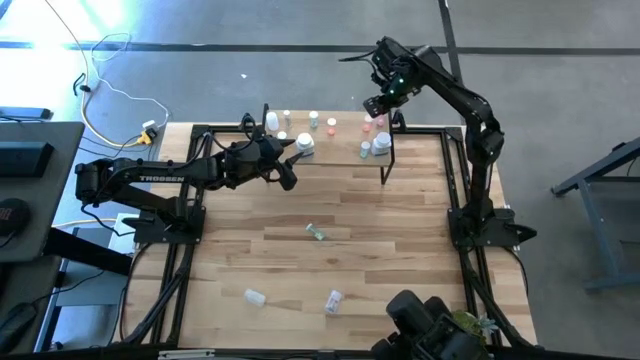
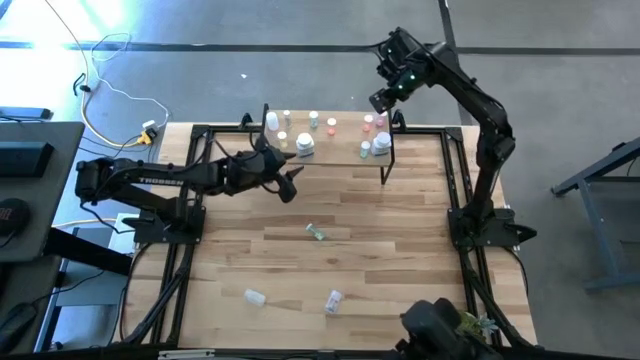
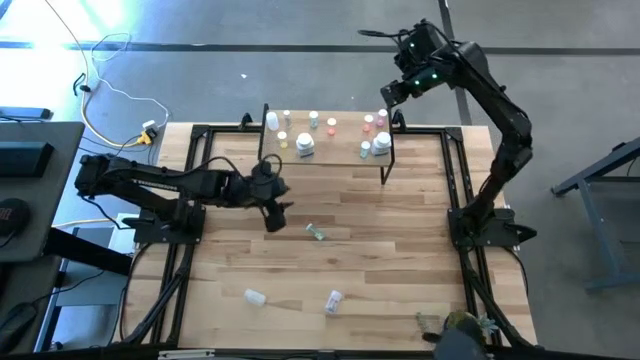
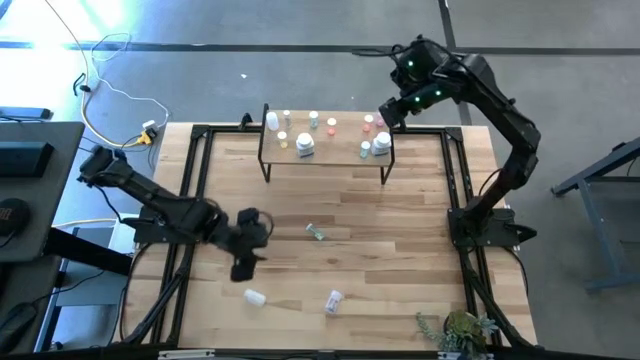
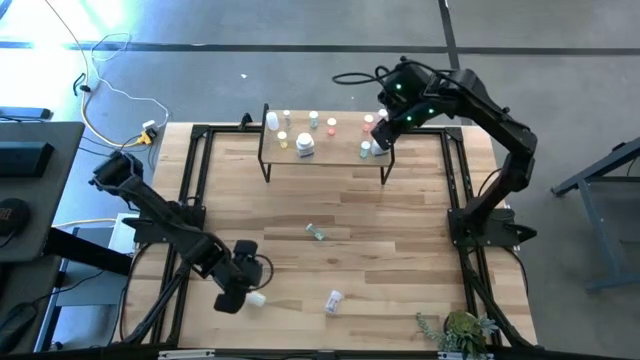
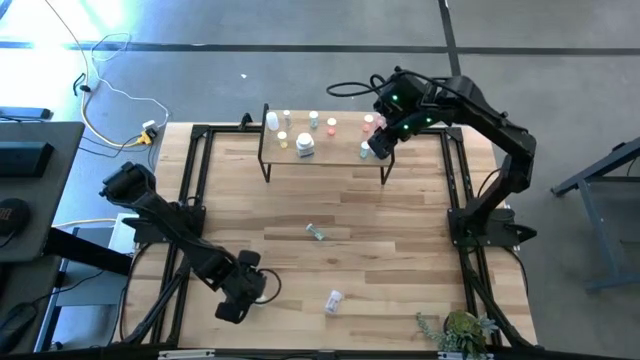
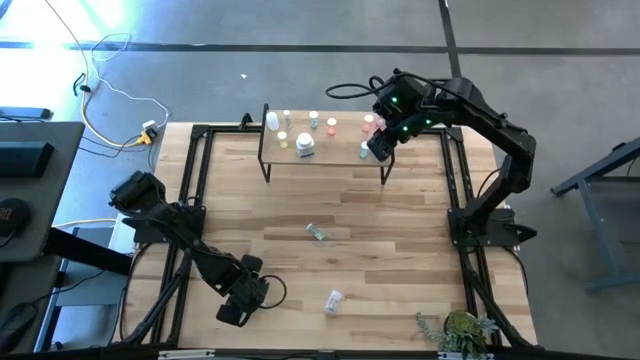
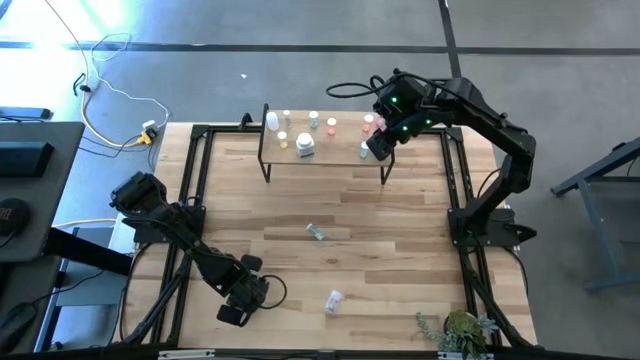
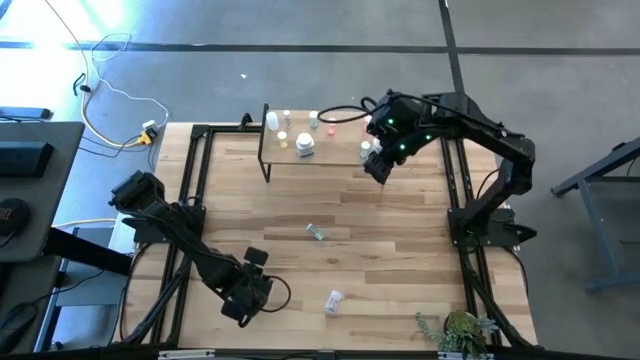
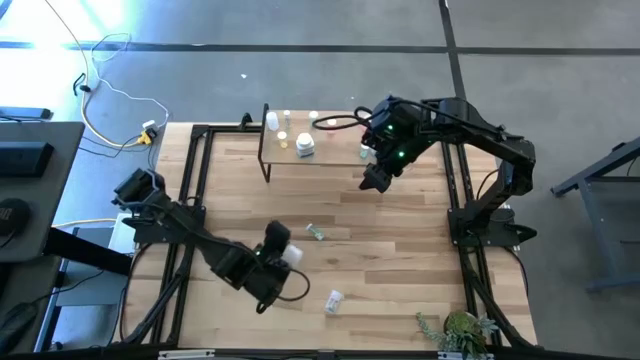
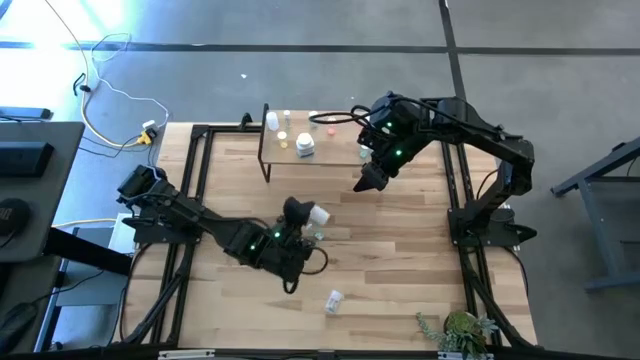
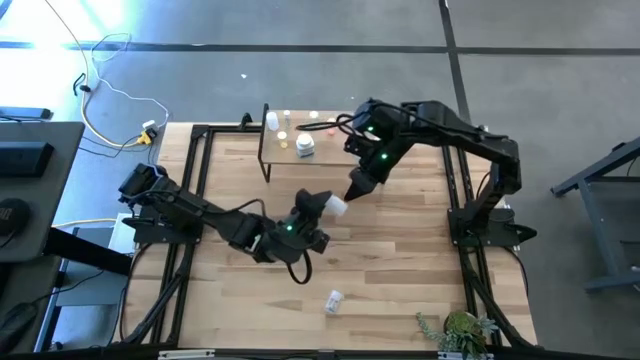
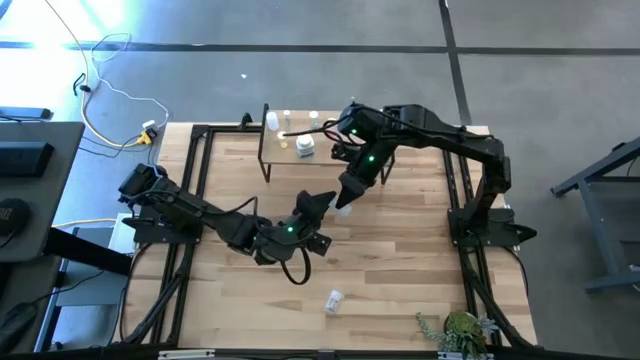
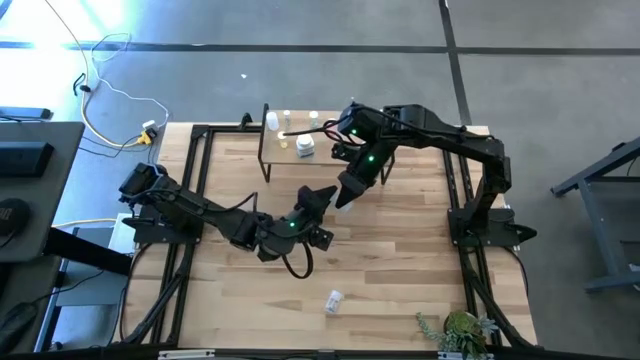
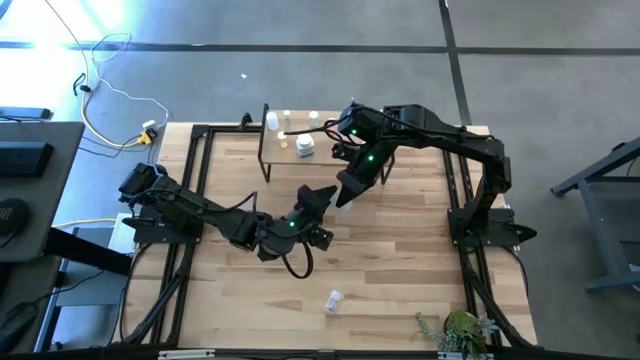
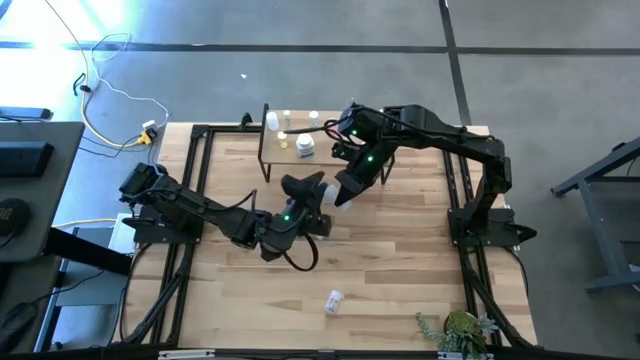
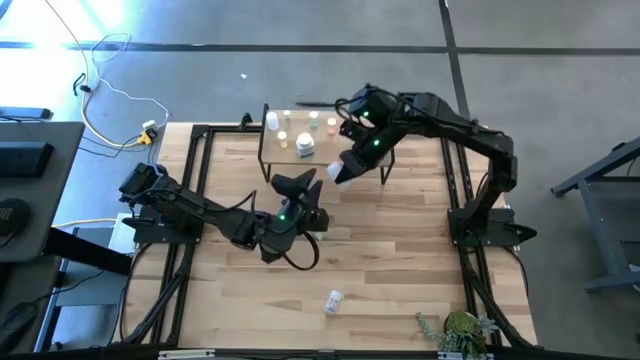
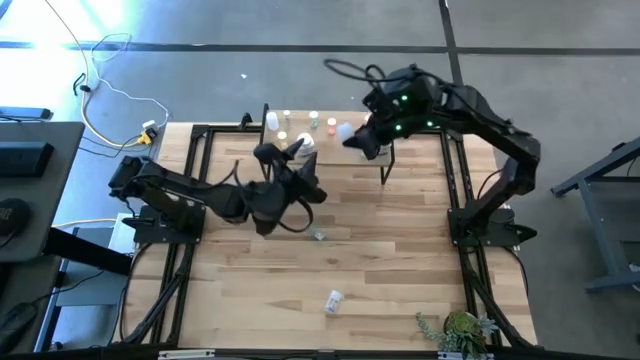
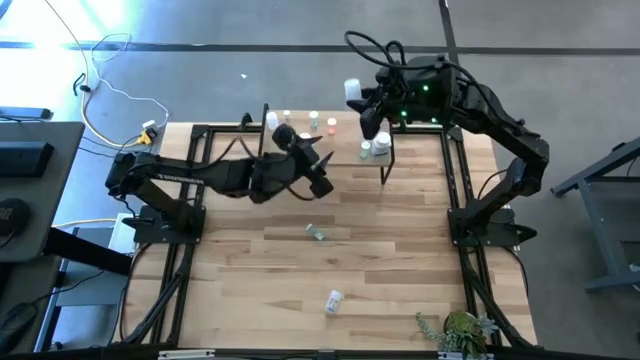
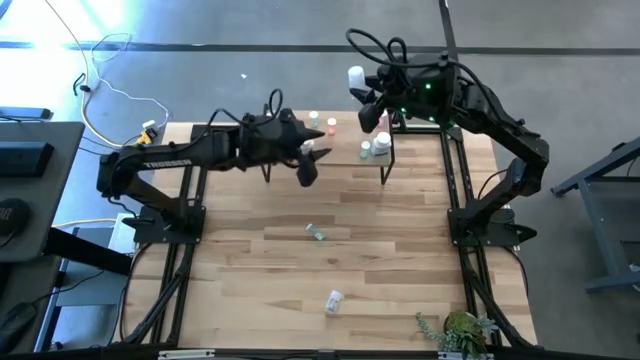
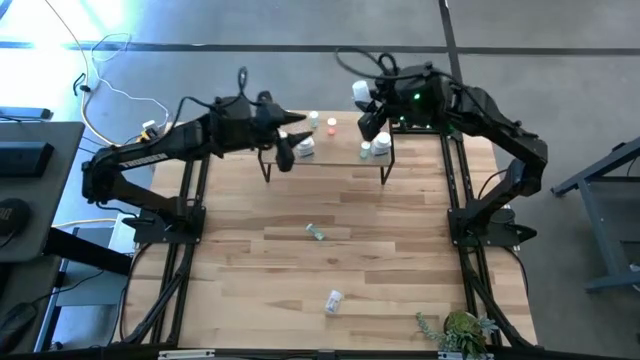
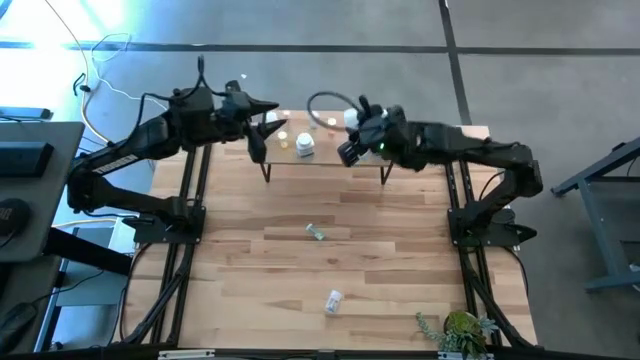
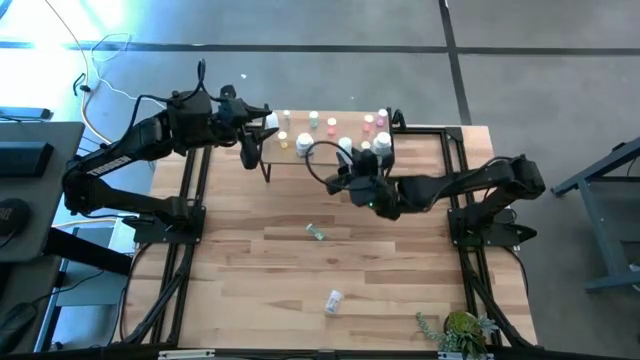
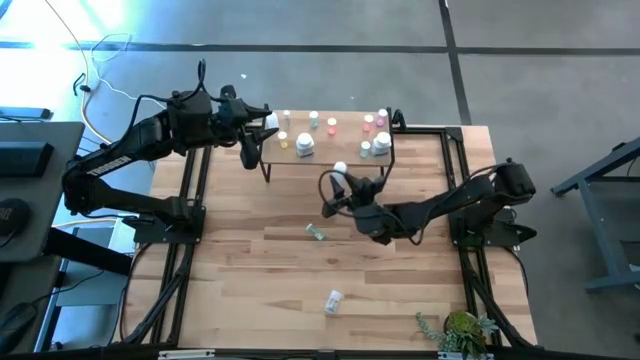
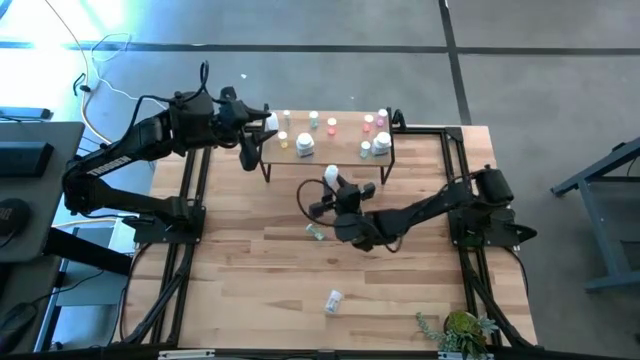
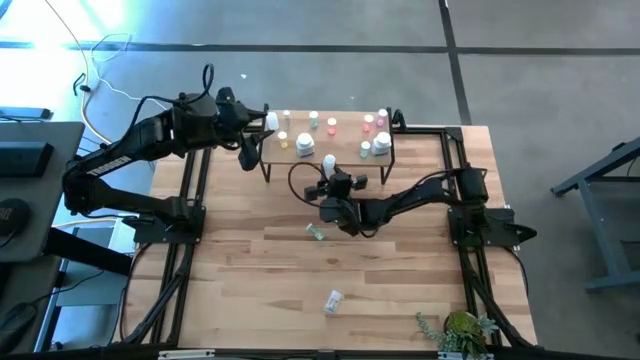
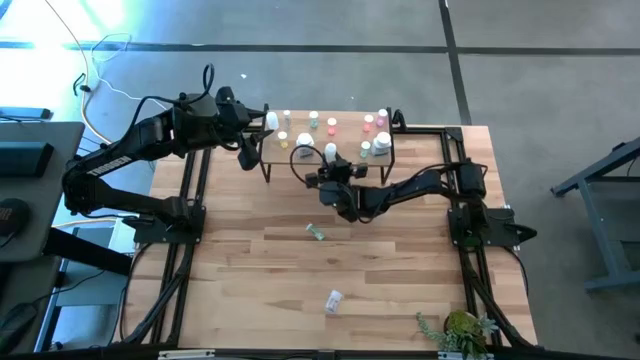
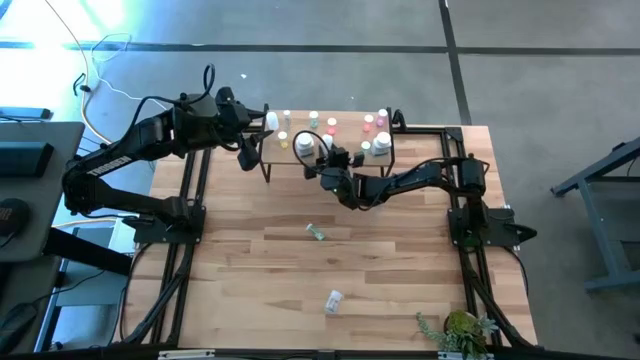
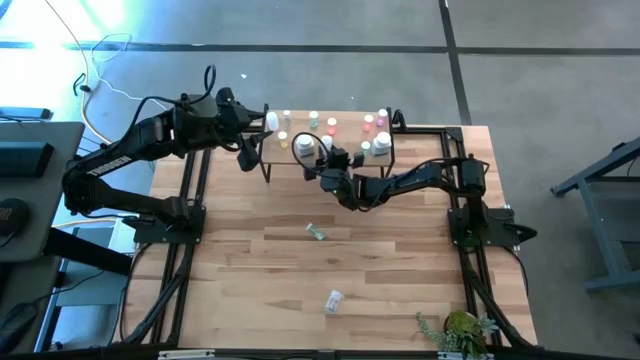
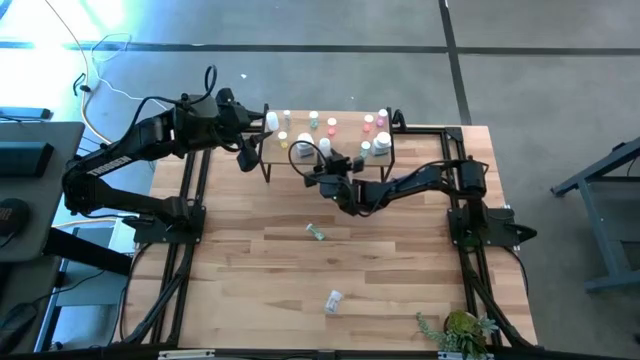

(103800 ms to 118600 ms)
Task: Pick and place medicine bottles onto shelf by color
Put the white pill bottle on the shelf

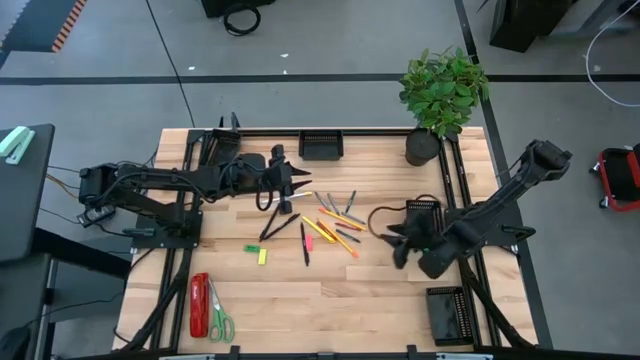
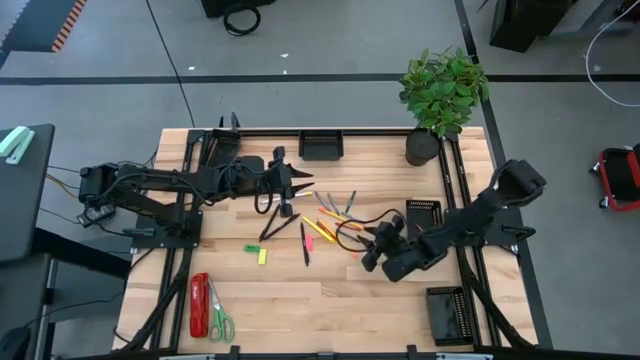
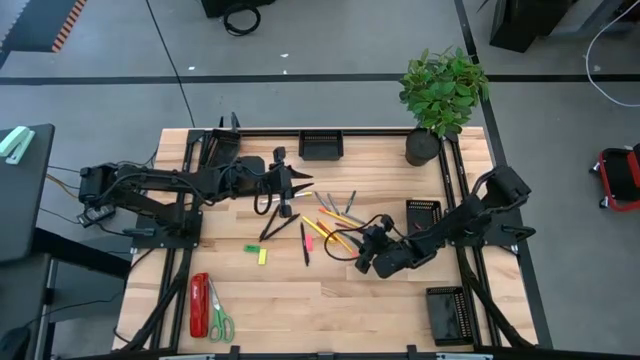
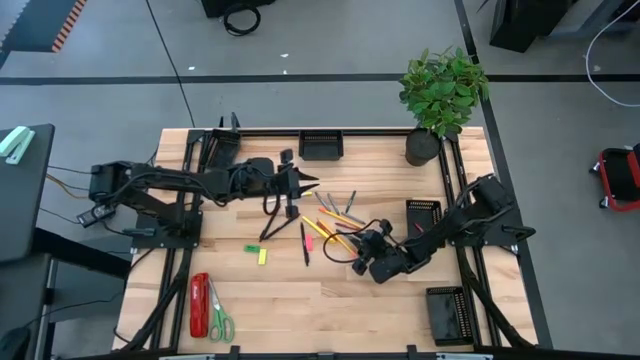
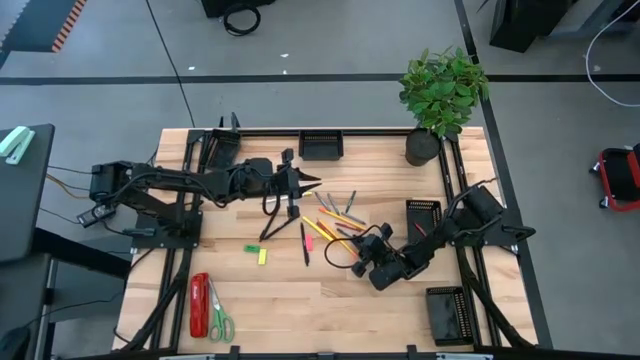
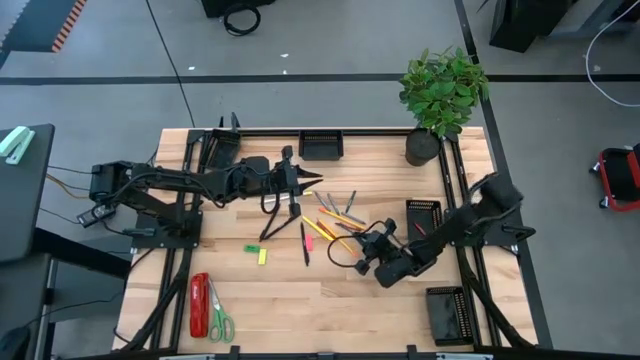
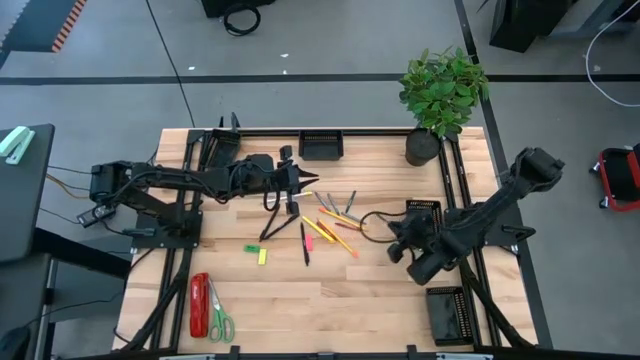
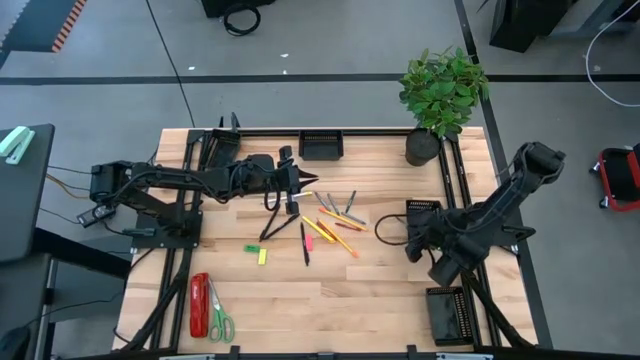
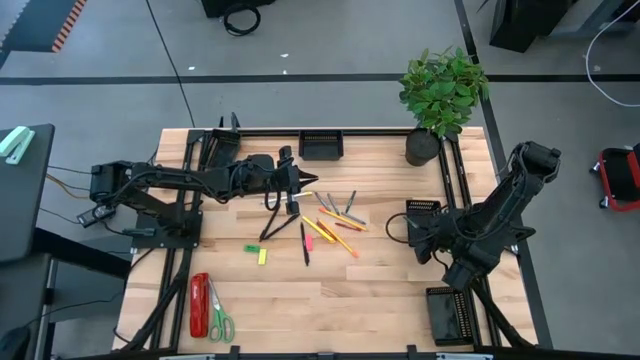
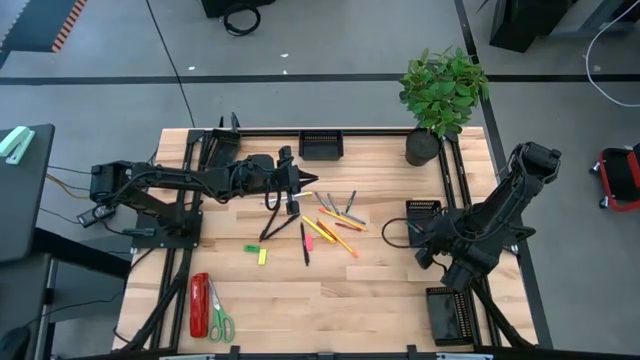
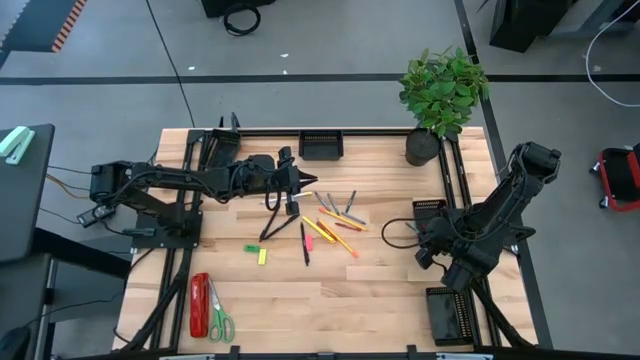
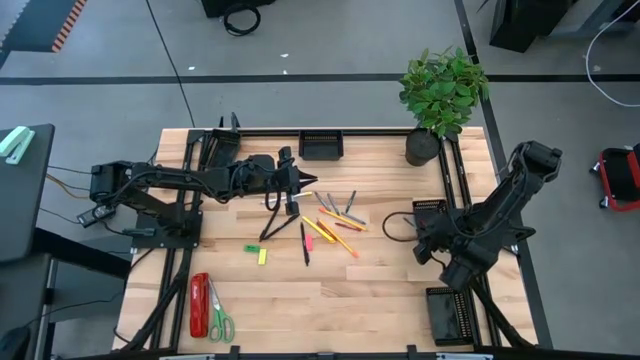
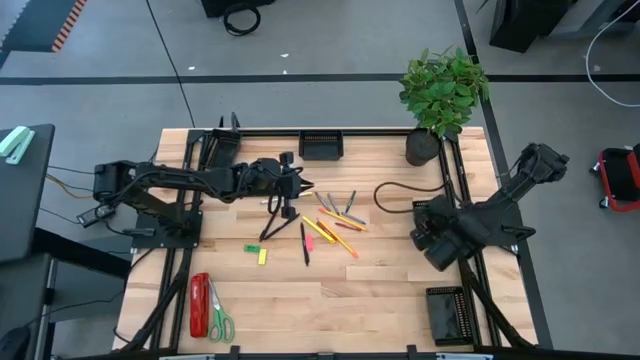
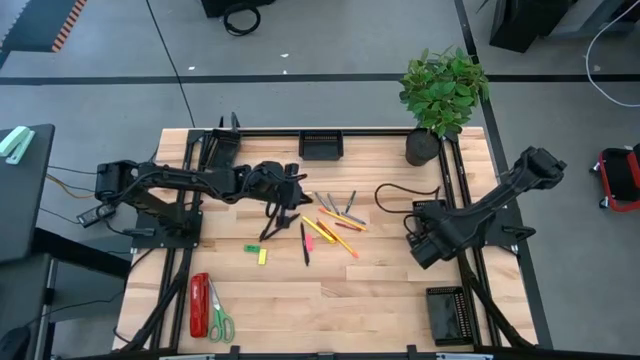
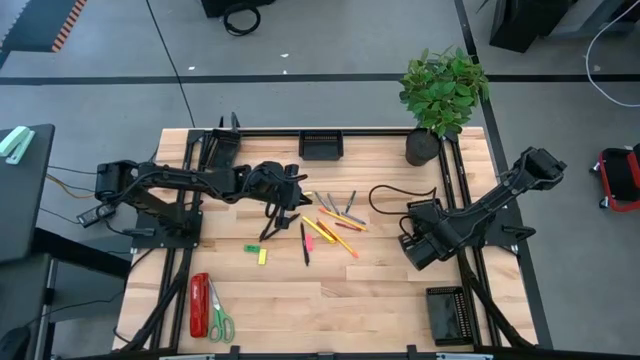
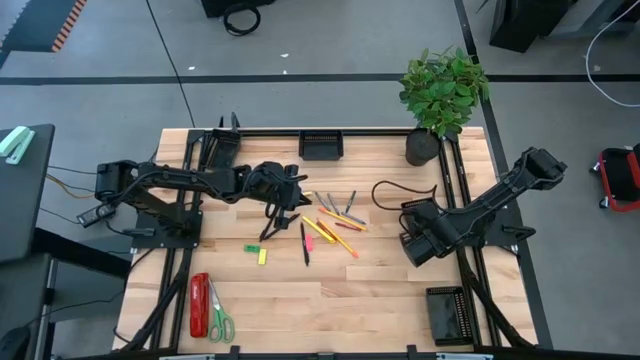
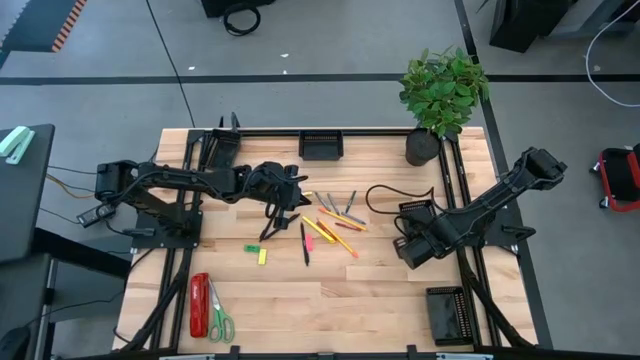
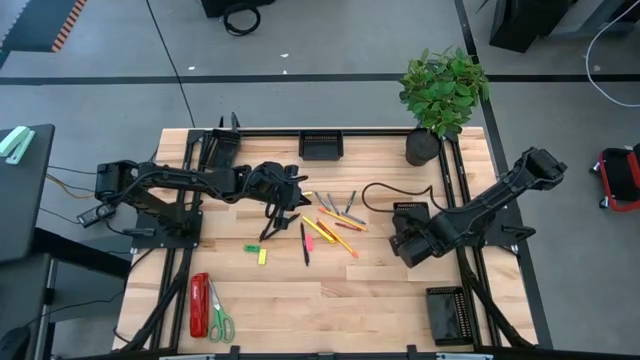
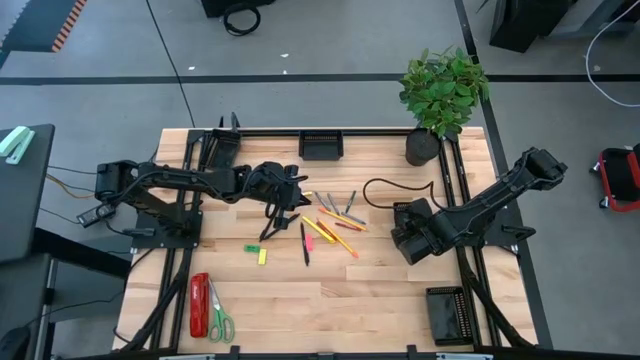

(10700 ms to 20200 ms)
Task: Sort crayons/erasers/pens/pencils in bins
Put the green crayon into the middle right black bin
